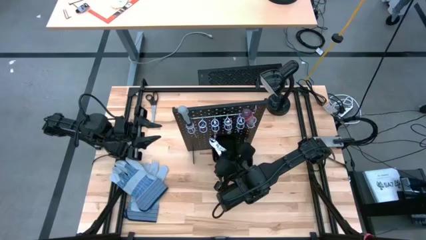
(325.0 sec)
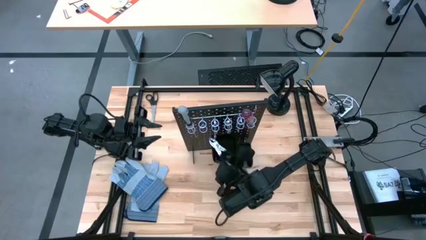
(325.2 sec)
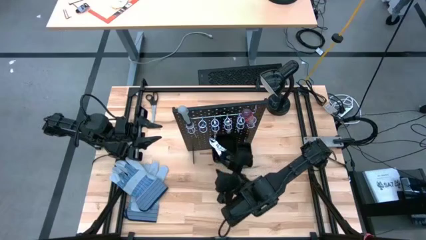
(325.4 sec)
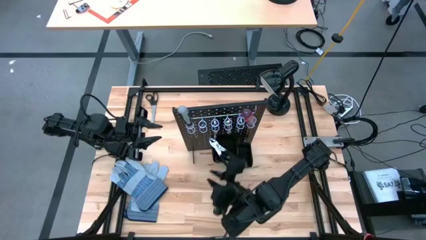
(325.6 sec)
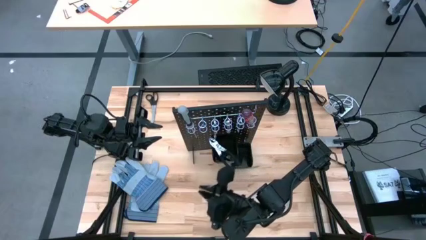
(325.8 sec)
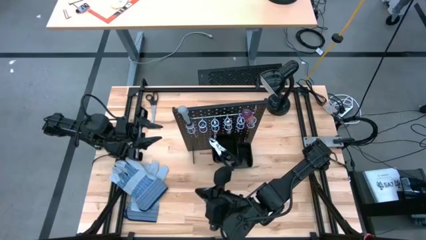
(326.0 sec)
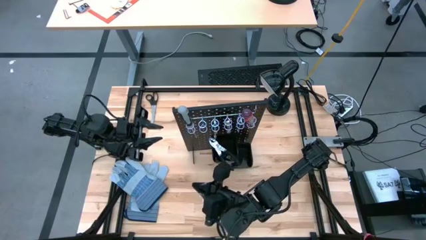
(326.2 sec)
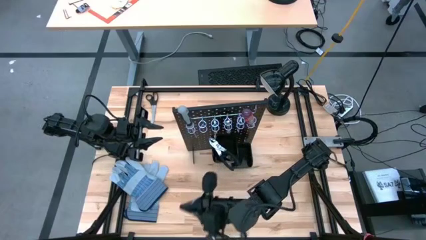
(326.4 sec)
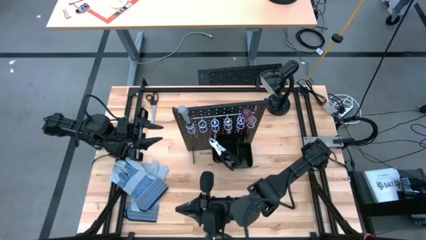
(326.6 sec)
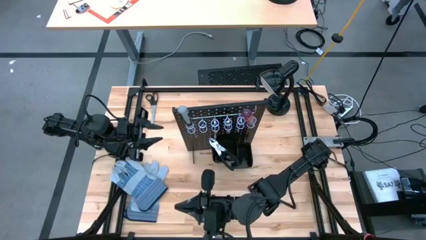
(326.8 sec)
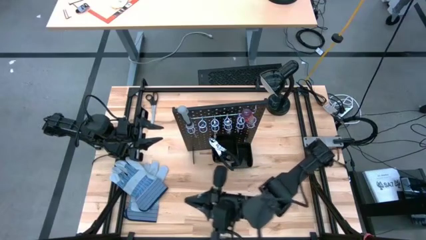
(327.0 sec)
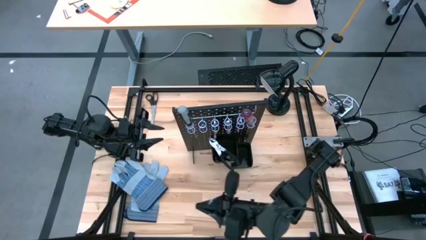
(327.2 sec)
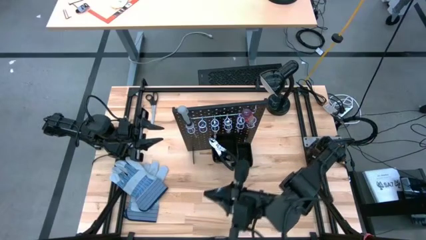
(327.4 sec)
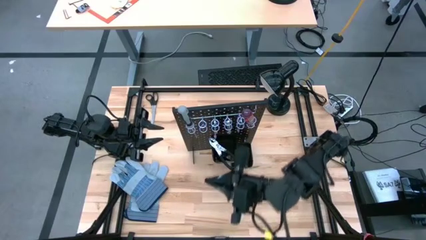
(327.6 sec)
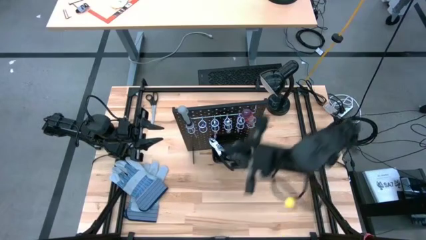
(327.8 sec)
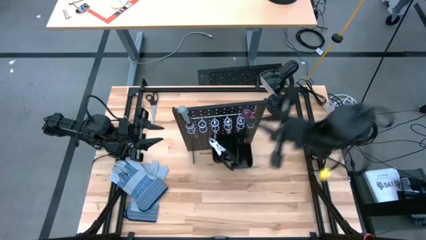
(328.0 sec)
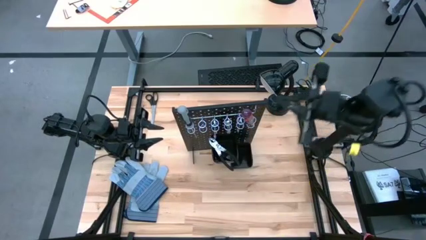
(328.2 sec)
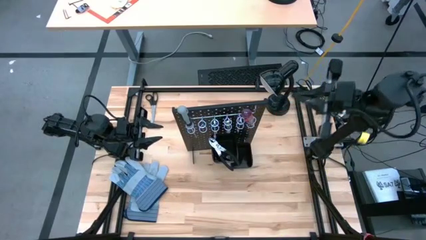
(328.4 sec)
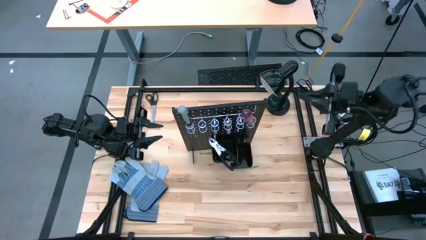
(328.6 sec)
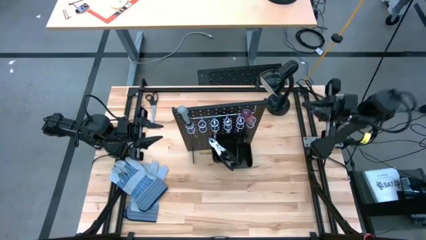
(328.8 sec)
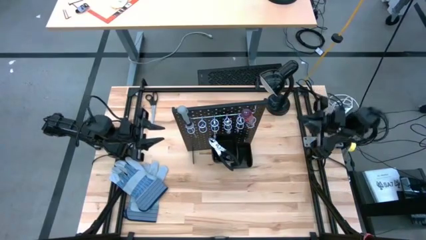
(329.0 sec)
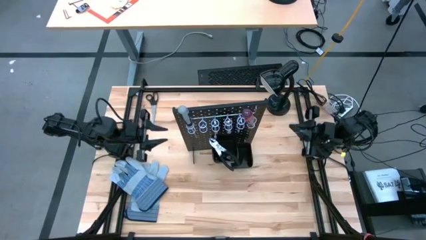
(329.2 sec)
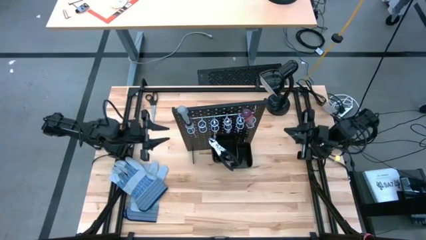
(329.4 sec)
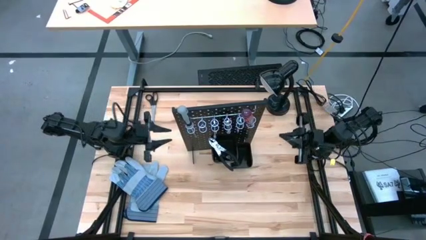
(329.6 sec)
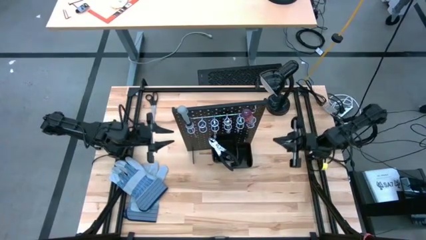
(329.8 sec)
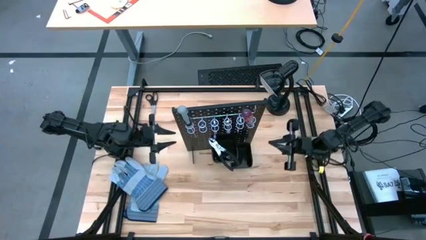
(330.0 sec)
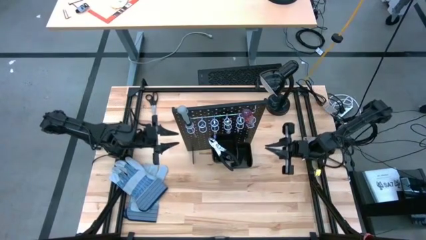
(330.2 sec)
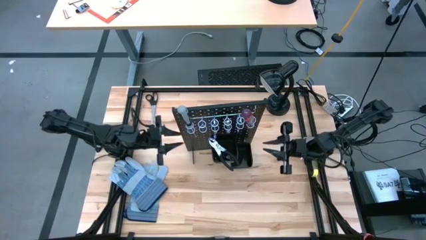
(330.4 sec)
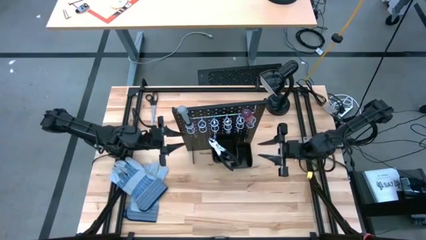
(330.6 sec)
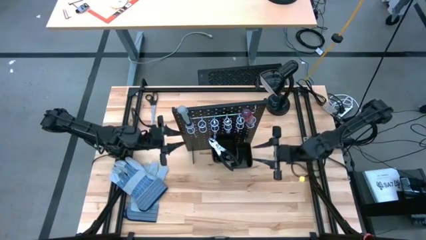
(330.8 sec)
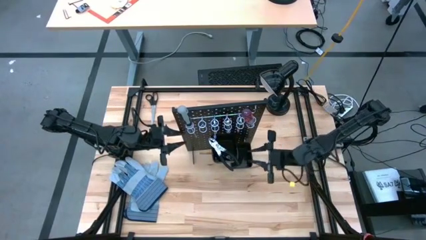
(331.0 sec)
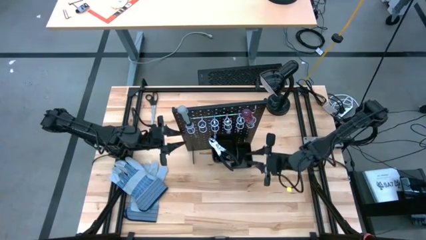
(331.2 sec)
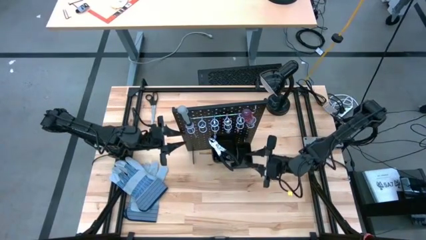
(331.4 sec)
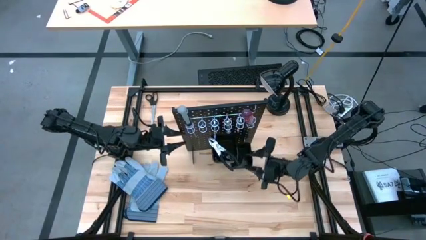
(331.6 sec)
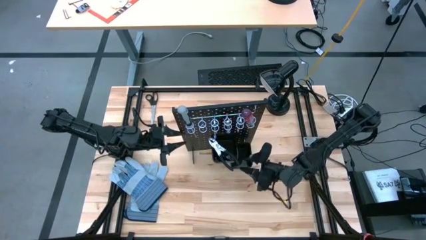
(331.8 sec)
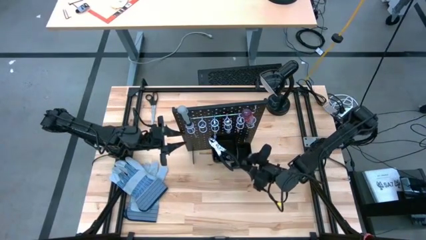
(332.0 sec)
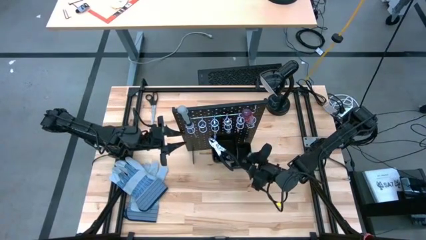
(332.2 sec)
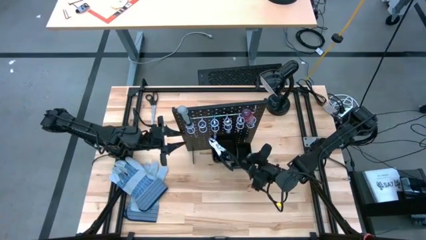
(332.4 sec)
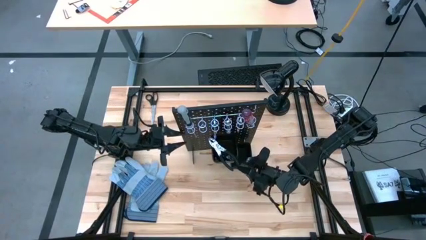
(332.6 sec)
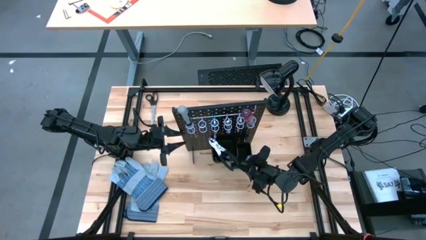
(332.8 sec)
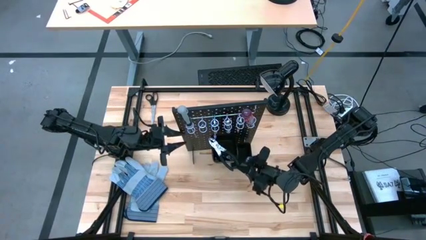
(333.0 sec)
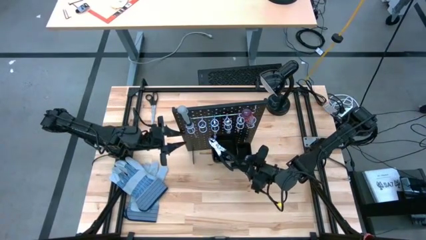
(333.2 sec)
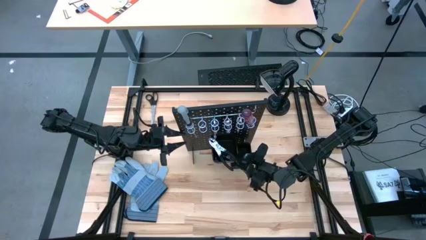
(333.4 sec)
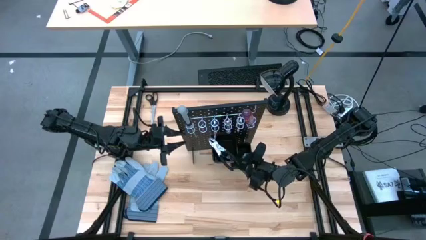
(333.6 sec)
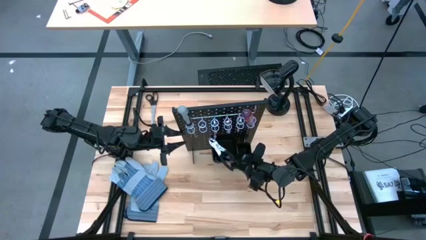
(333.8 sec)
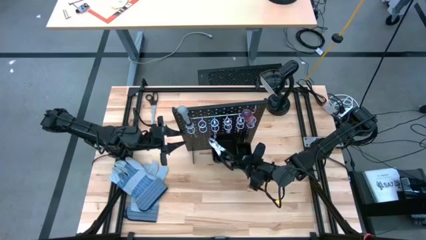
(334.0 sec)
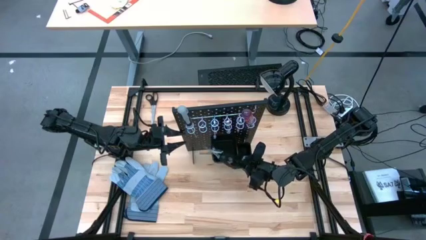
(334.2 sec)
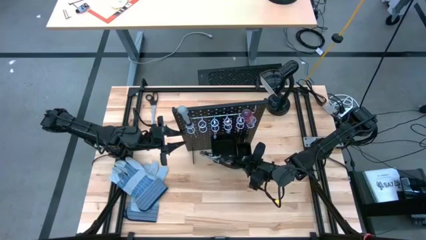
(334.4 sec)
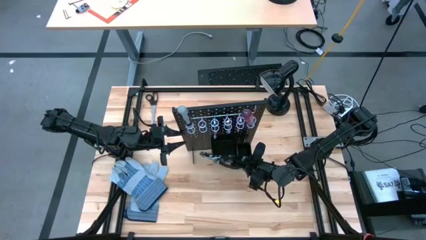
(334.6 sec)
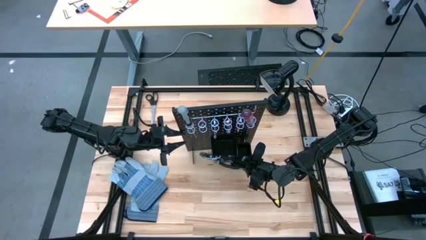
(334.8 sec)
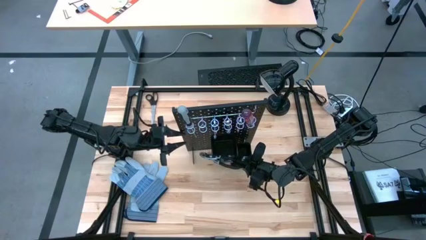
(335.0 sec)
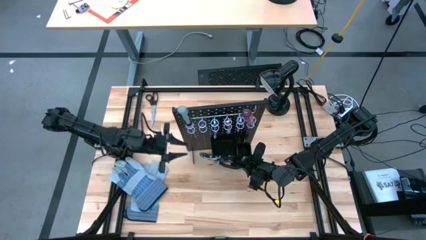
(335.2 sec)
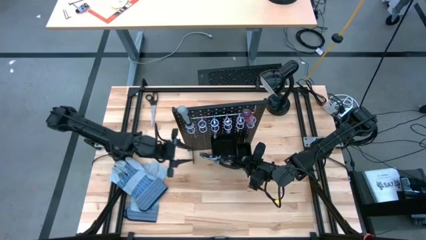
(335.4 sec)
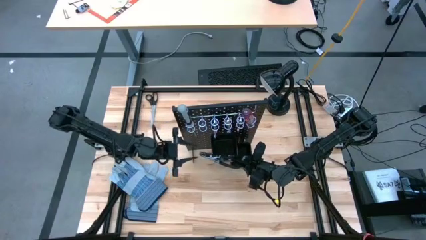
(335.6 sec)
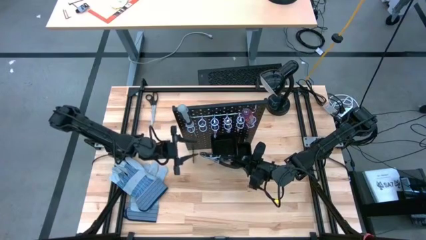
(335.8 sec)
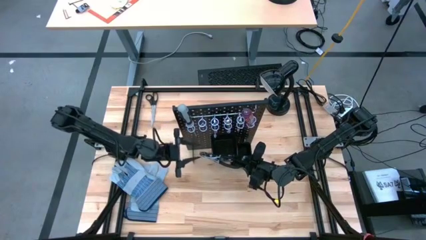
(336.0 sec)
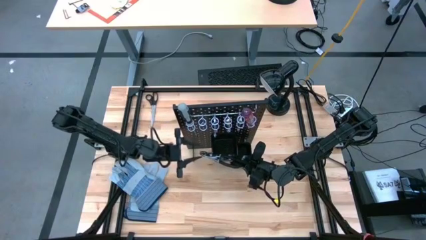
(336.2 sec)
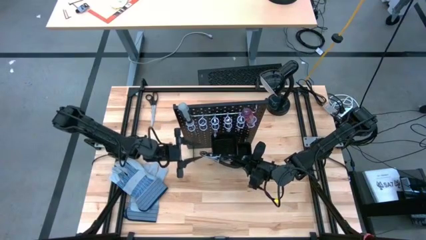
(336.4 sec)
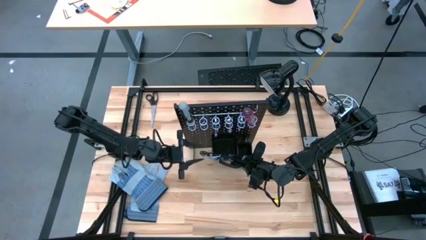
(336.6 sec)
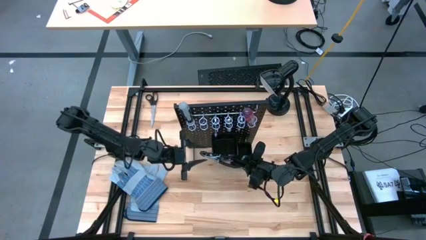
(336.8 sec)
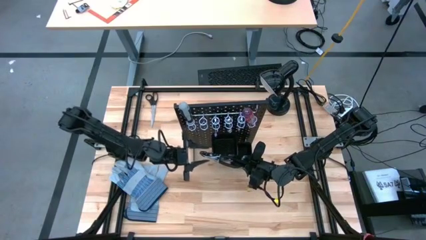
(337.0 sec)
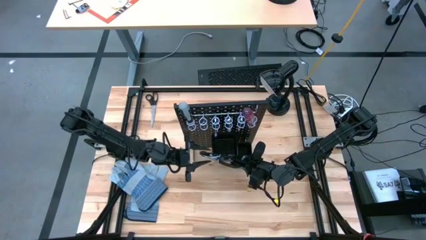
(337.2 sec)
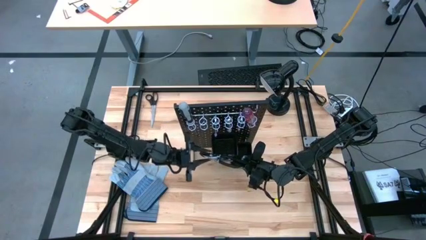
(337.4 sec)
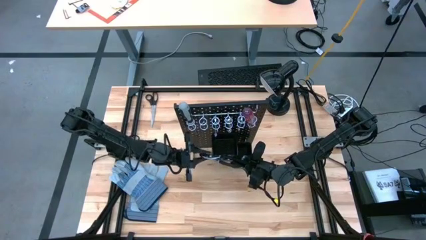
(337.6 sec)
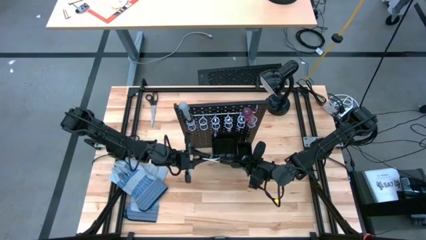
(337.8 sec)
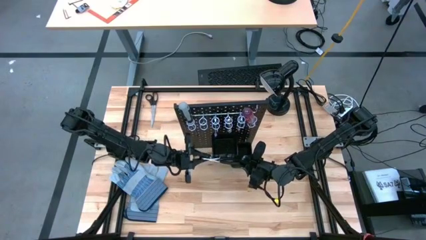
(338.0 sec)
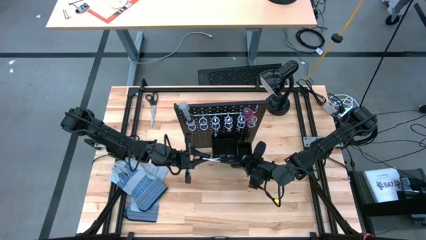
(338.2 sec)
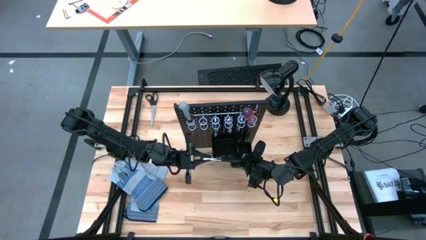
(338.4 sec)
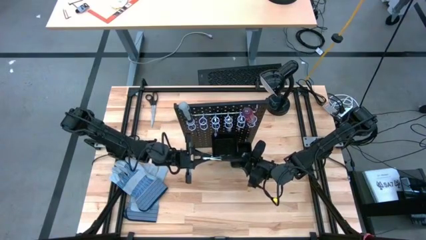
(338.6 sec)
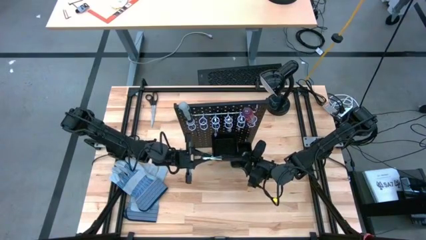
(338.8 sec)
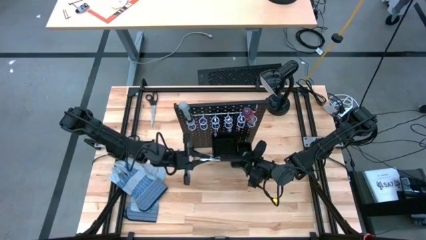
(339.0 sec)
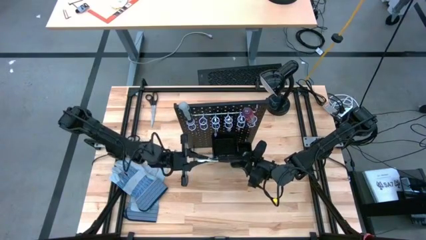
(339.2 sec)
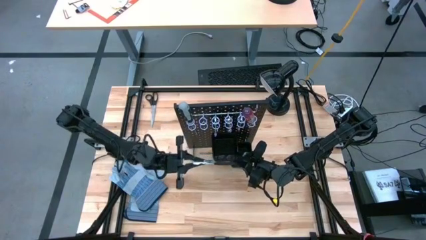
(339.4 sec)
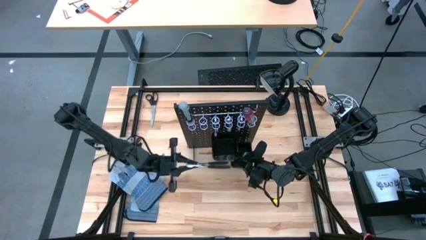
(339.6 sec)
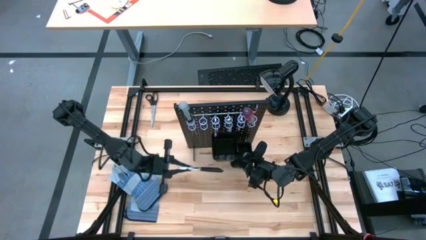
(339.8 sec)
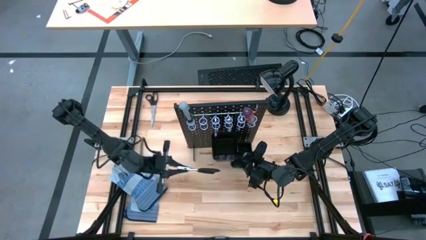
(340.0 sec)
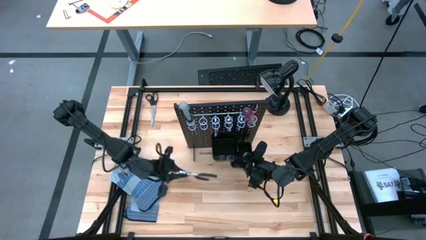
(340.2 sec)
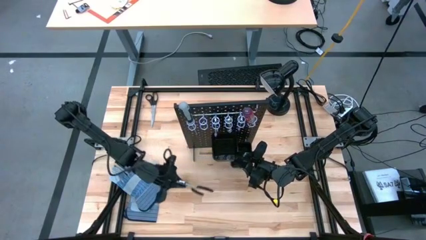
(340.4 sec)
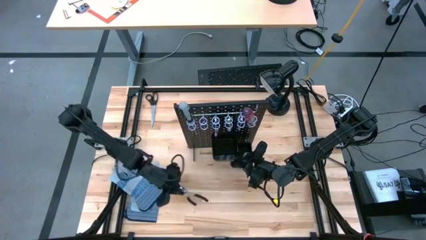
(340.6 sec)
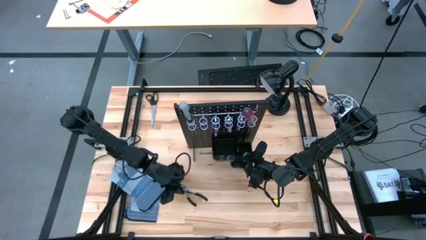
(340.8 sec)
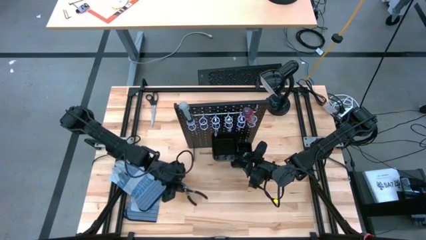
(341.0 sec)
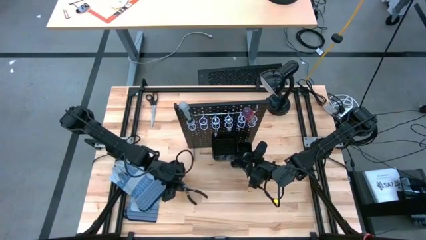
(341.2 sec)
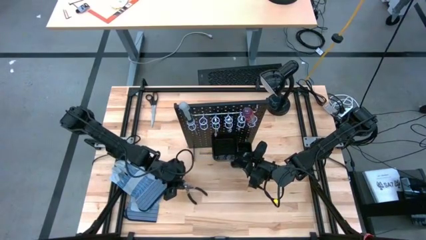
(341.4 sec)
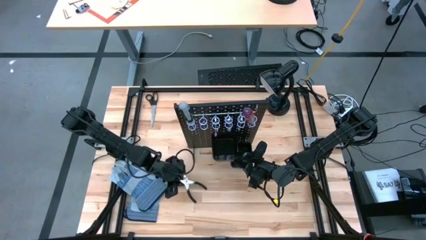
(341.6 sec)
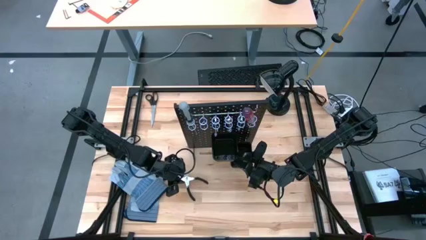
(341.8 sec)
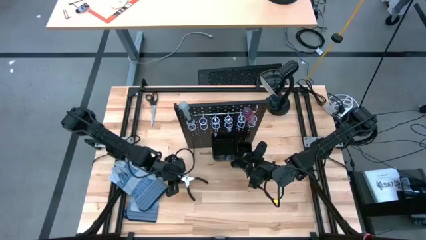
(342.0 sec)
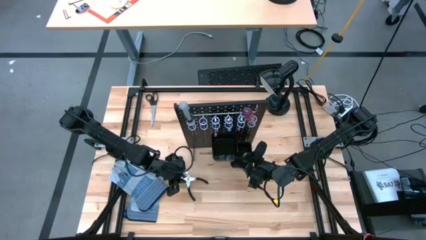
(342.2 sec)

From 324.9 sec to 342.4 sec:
Task: Hang tools onto peg board
Remove the black pliers from the black container on the pegboard
